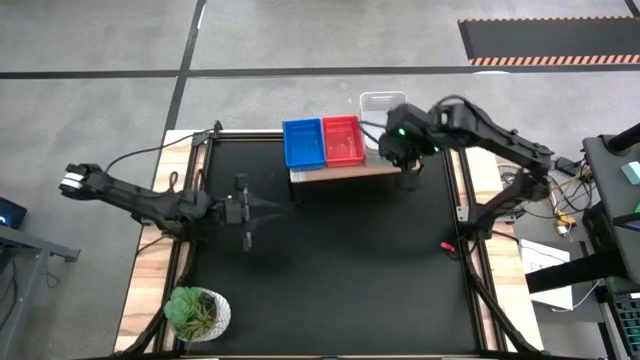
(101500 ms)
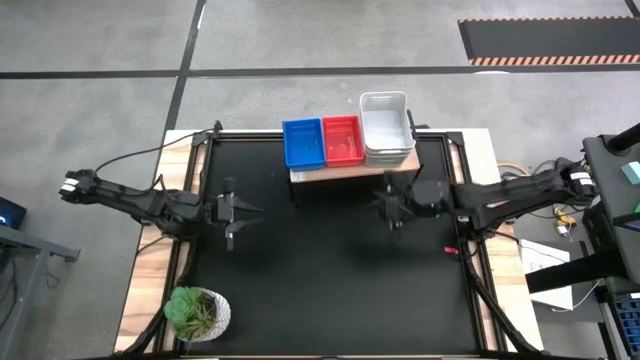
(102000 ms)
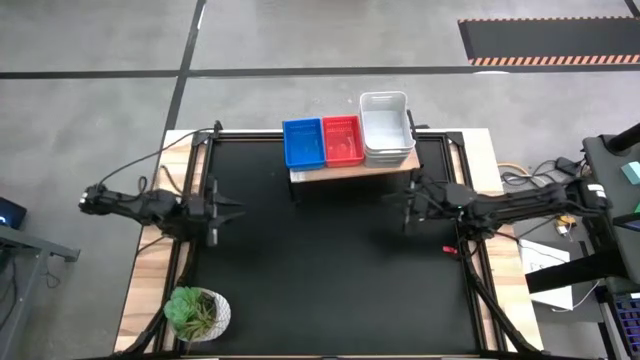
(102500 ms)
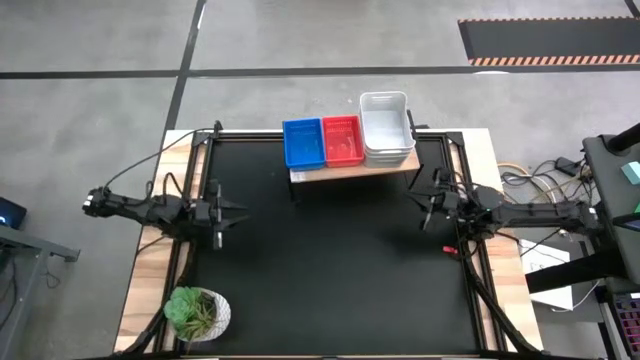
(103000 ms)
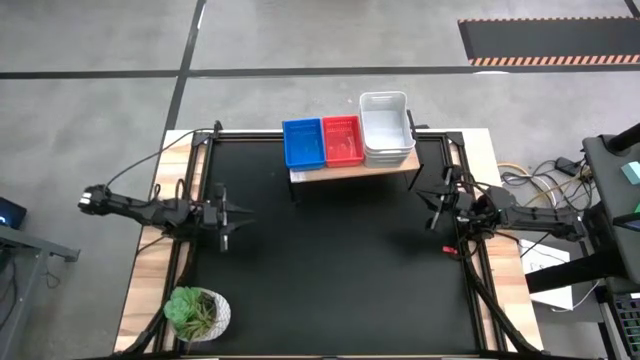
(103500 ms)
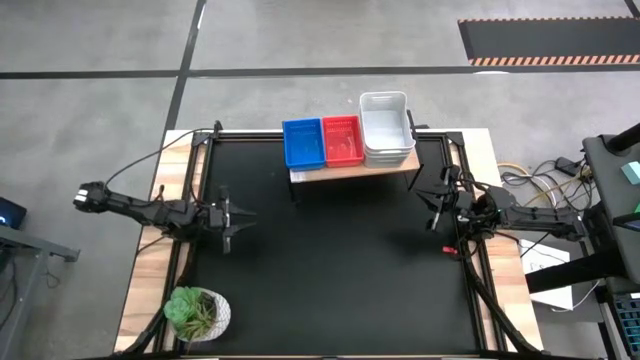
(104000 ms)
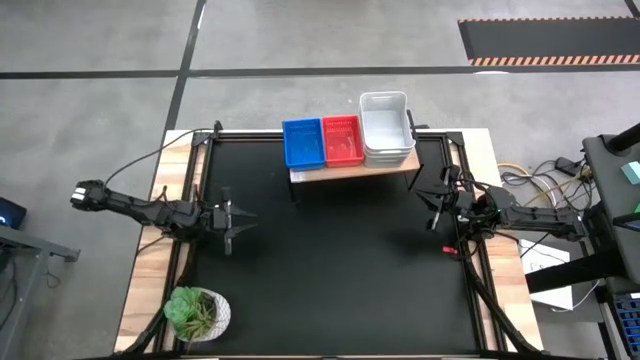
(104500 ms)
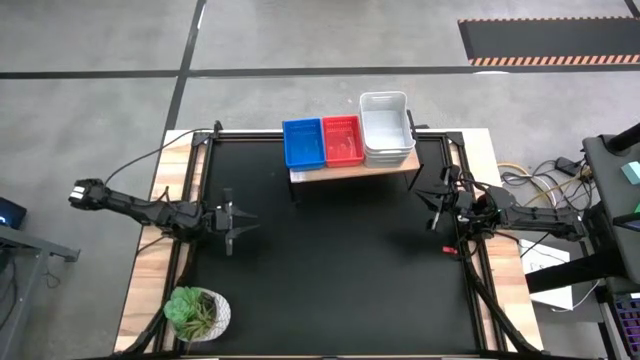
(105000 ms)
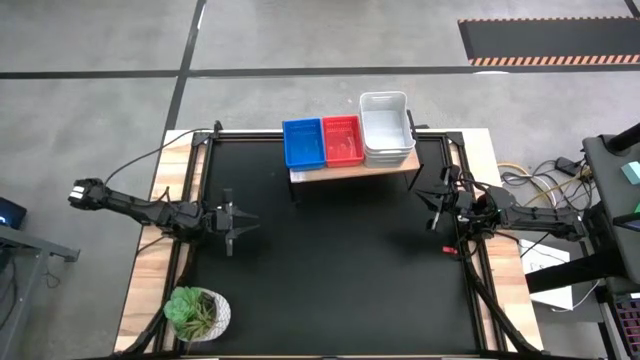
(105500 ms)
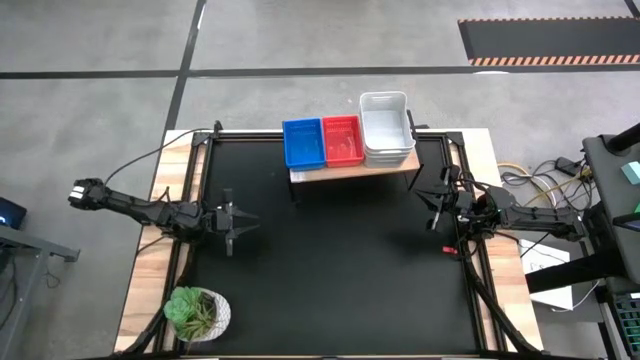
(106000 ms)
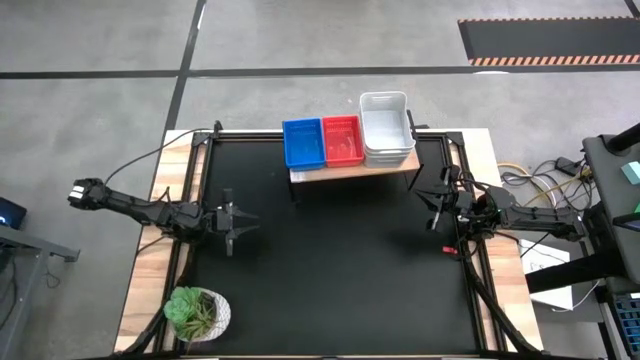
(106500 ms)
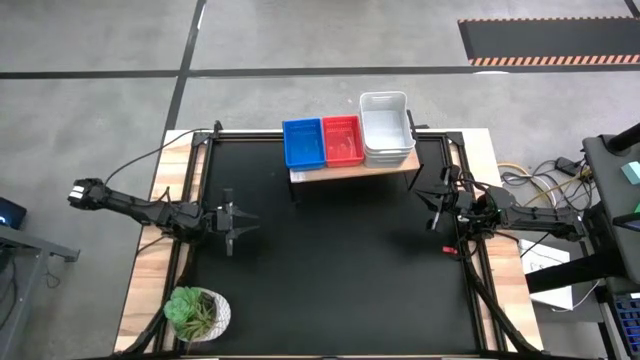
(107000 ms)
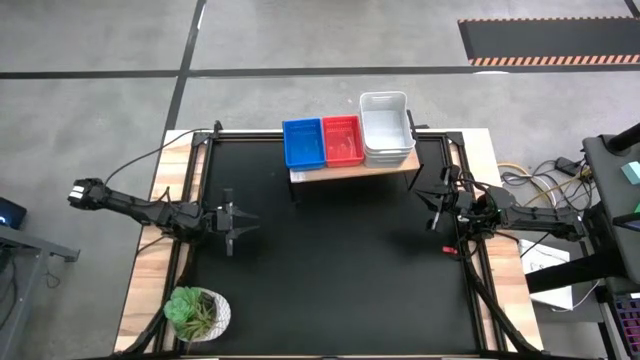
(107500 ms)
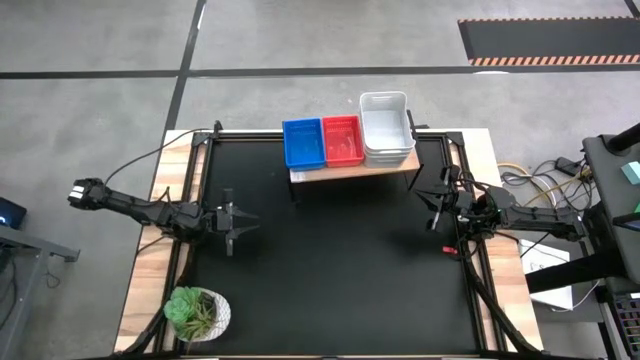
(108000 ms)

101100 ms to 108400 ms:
Return to Home Position
